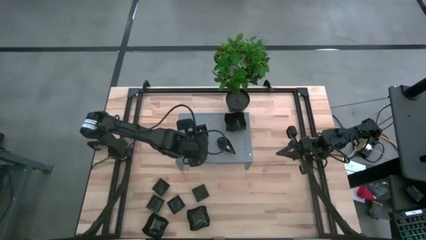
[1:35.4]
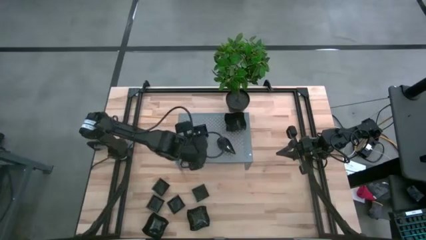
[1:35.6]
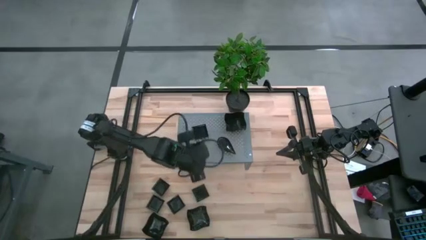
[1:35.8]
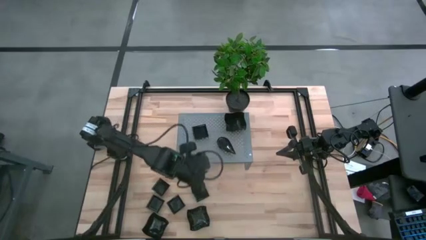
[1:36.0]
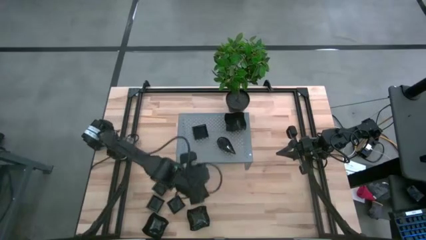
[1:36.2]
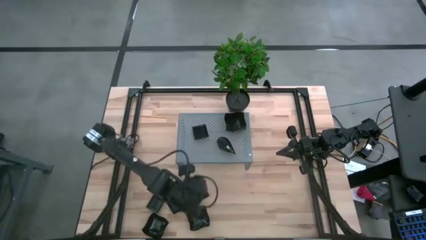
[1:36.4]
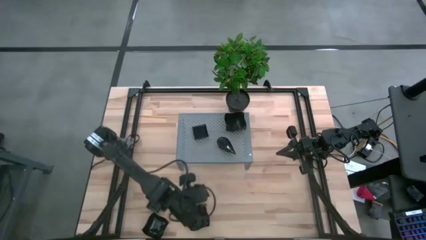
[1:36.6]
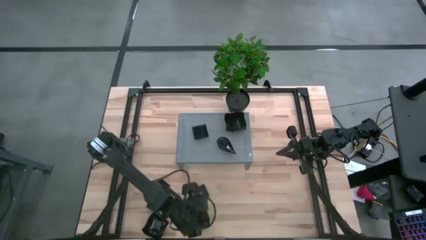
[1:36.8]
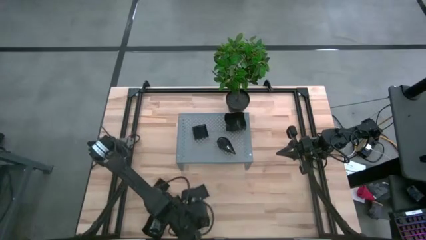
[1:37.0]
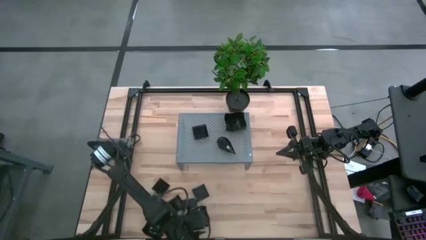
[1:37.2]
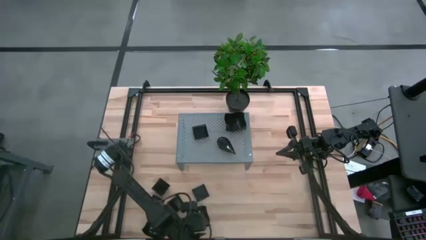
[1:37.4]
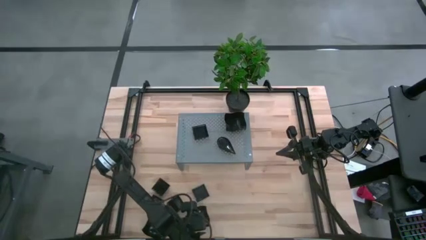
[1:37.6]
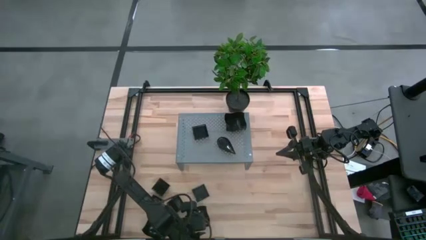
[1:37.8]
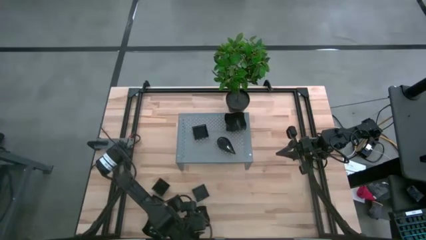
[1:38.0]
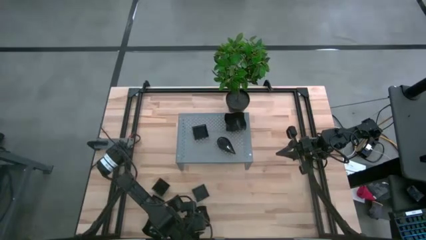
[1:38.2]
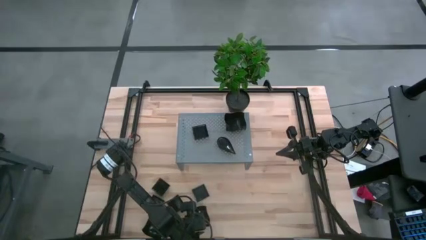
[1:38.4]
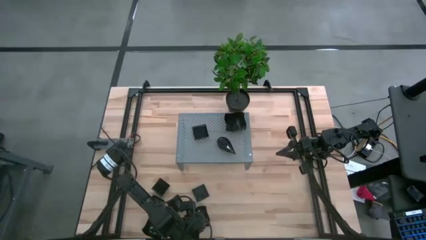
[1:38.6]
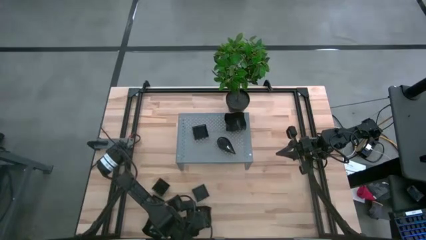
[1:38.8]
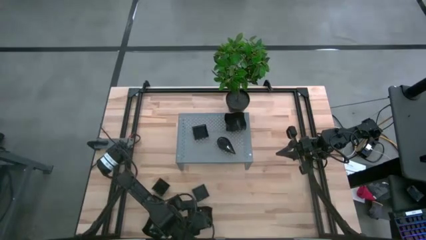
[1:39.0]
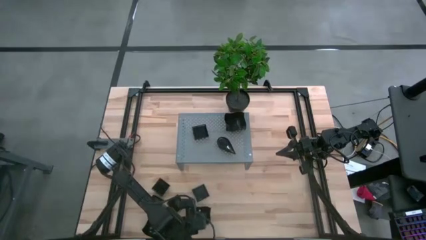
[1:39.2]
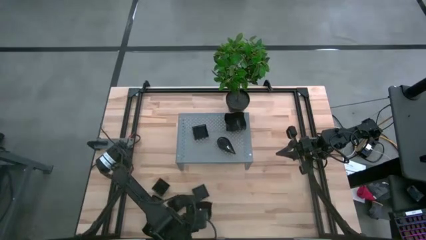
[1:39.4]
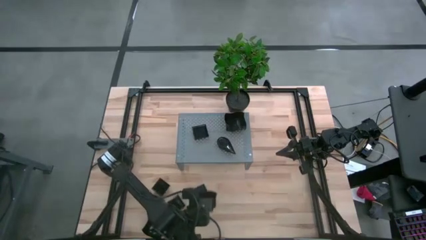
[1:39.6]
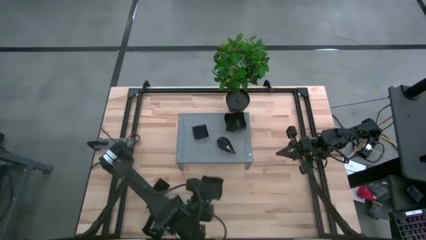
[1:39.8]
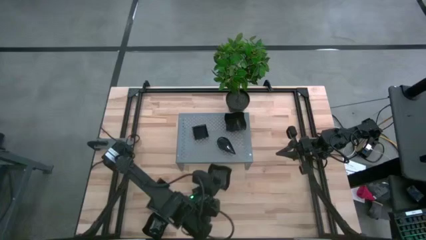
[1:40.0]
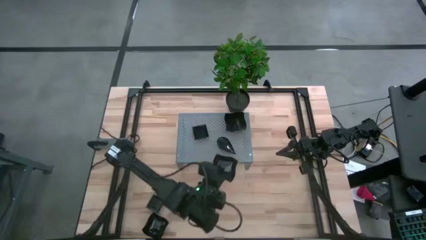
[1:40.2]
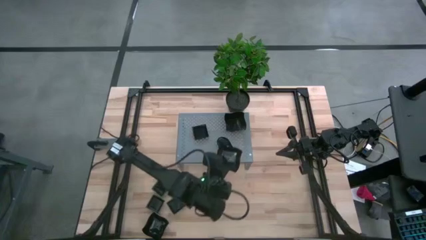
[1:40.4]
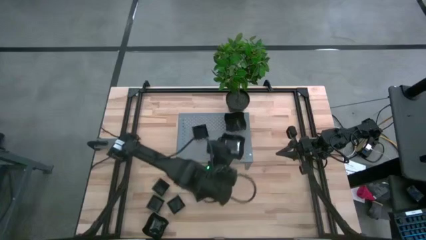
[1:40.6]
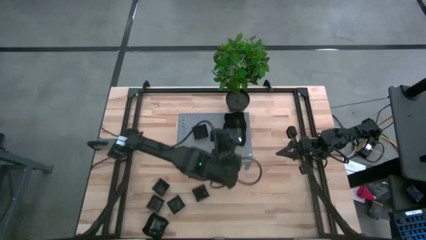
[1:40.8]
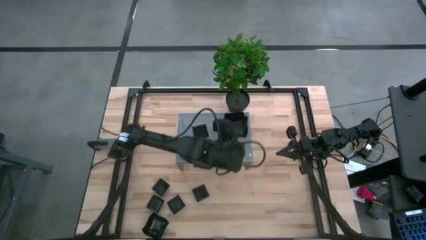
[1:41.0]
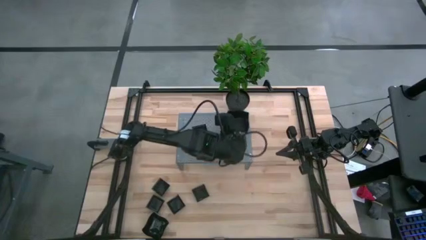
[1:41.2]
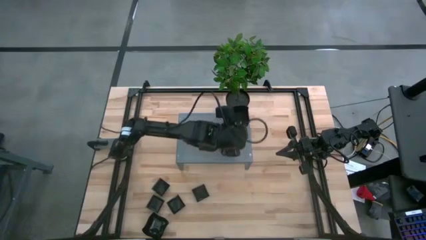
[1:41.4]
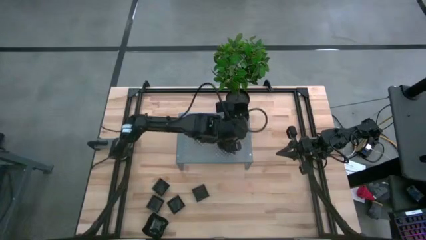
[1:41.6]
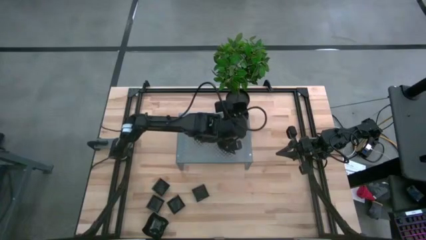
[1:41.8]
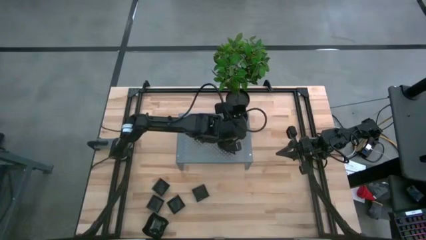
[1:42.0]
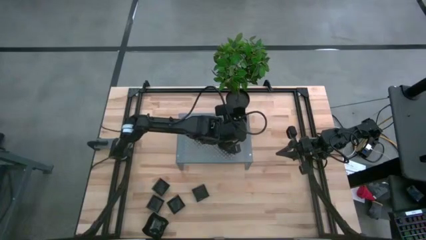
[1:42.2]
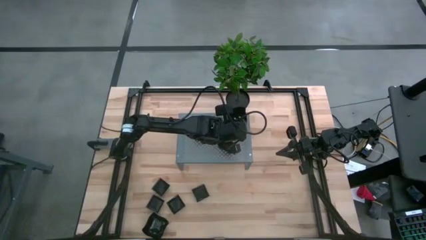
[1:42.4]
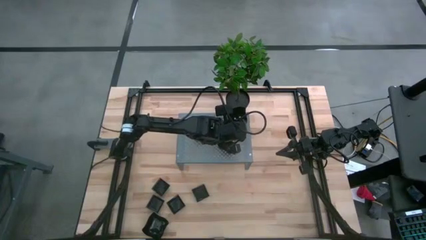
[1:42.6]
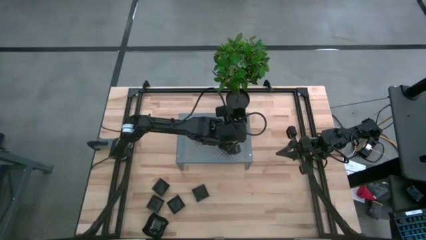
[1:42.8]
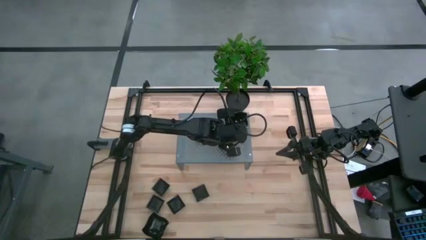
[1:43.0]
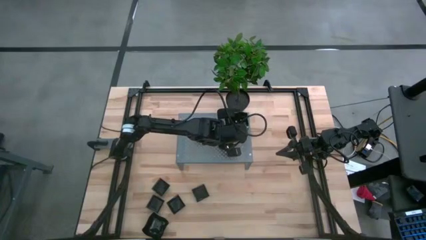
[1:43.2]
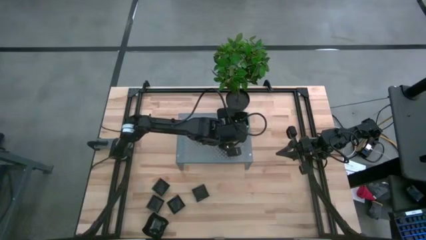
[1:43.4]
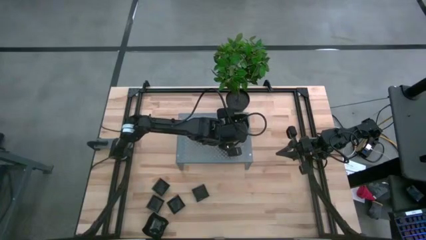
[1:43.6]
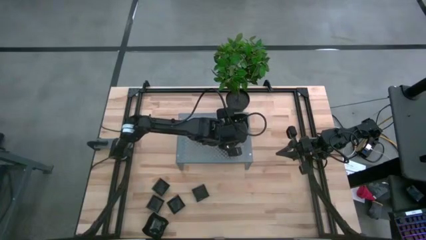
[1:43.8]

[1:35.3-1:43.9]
Task: Pick & Place Mini shaped plates
Stack the black distorted square plate on the black distorted square plates on the shelf

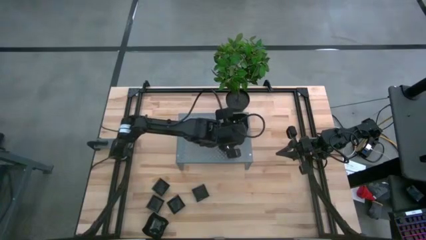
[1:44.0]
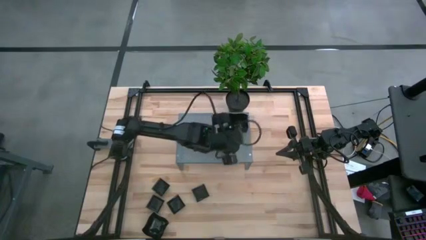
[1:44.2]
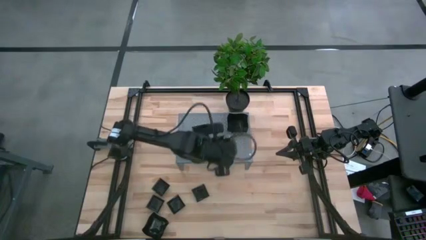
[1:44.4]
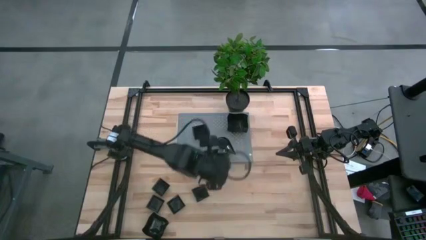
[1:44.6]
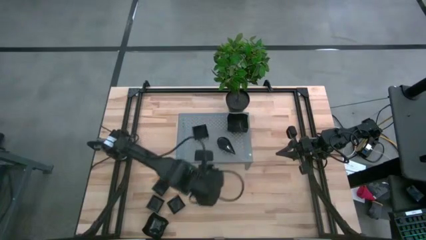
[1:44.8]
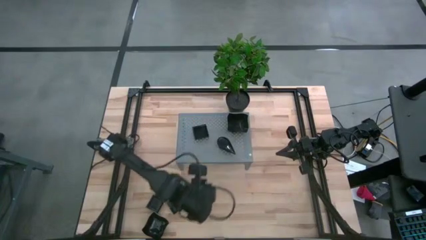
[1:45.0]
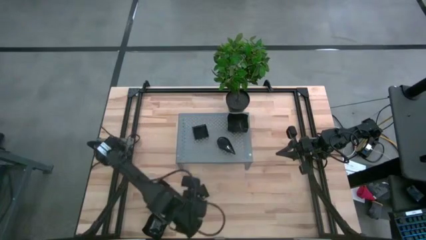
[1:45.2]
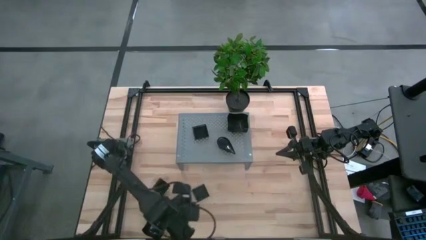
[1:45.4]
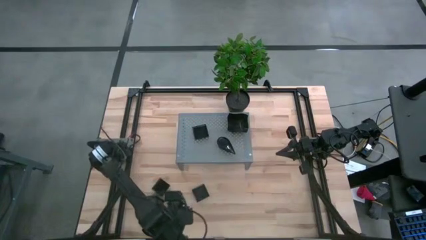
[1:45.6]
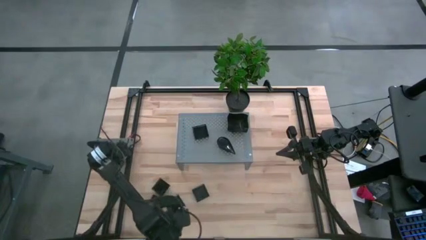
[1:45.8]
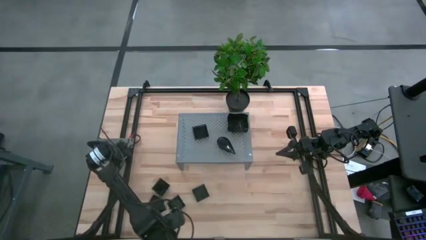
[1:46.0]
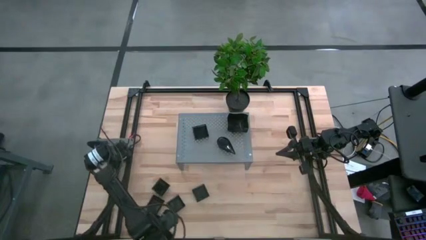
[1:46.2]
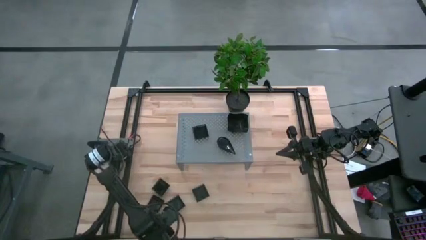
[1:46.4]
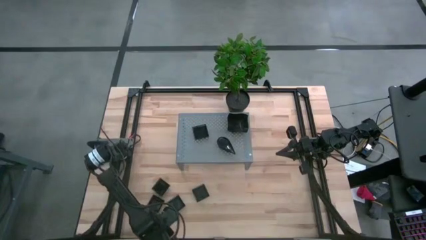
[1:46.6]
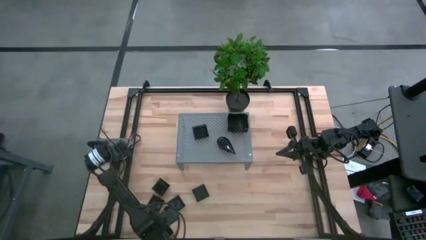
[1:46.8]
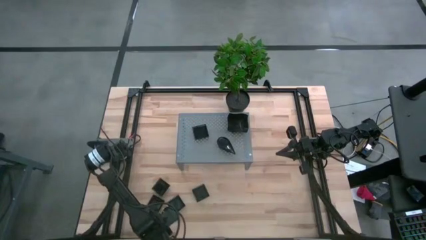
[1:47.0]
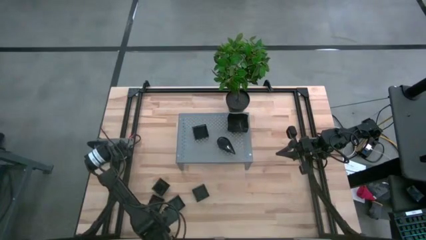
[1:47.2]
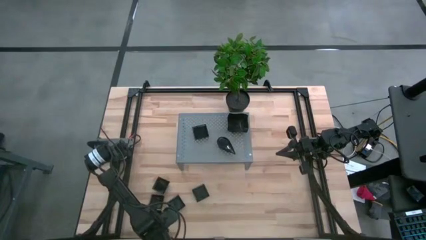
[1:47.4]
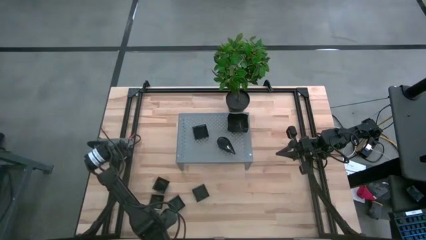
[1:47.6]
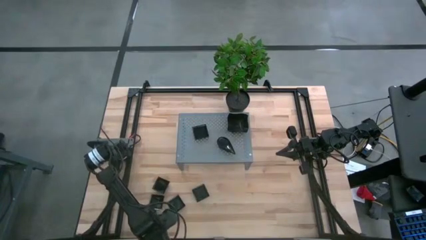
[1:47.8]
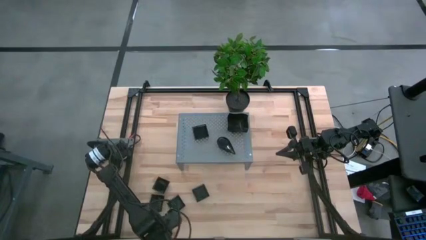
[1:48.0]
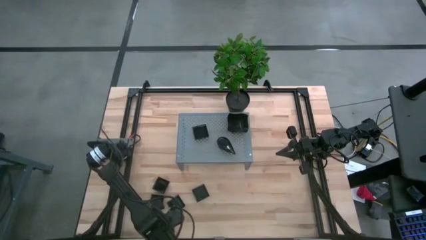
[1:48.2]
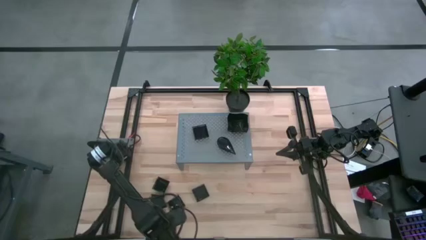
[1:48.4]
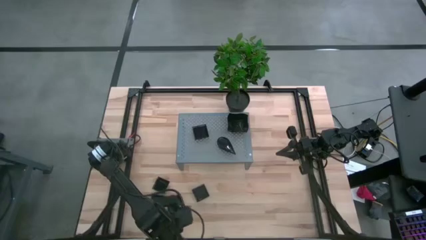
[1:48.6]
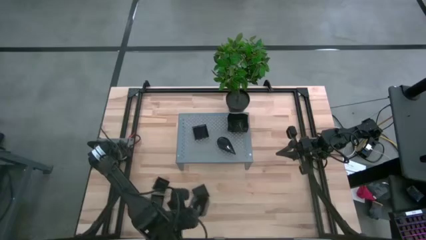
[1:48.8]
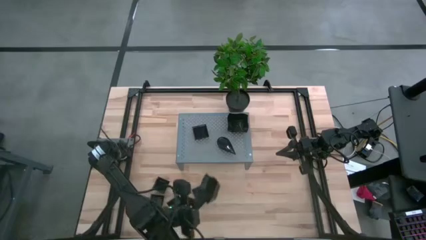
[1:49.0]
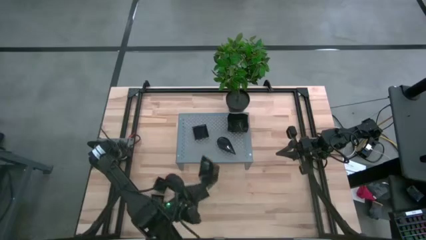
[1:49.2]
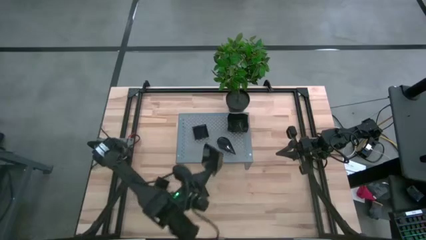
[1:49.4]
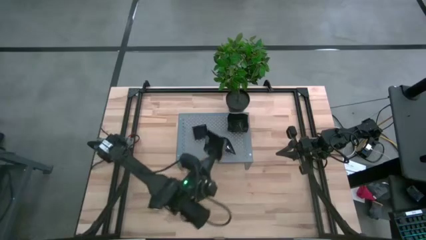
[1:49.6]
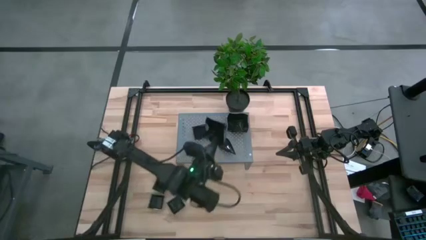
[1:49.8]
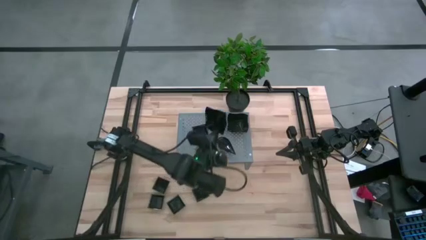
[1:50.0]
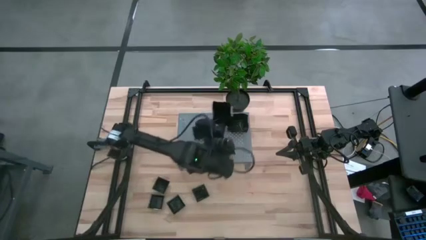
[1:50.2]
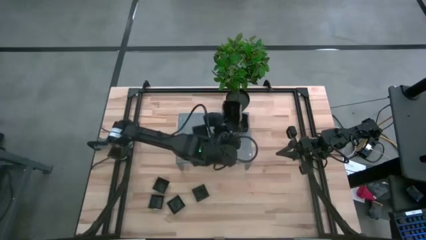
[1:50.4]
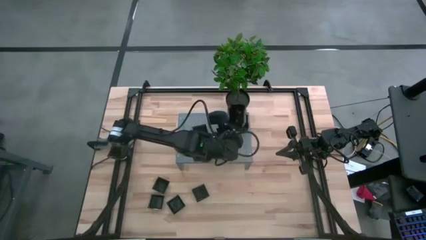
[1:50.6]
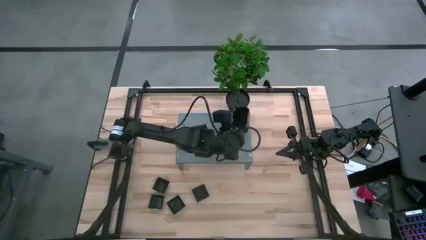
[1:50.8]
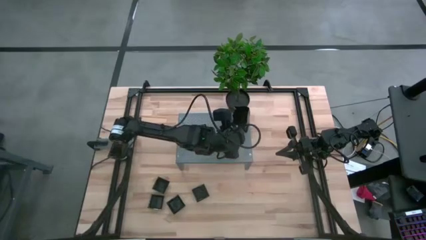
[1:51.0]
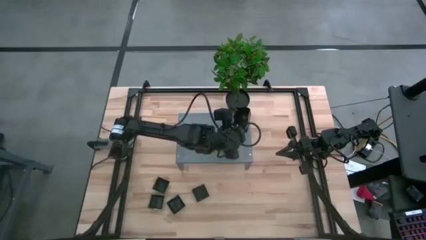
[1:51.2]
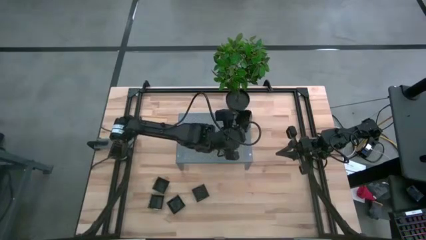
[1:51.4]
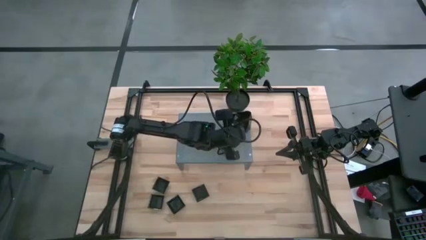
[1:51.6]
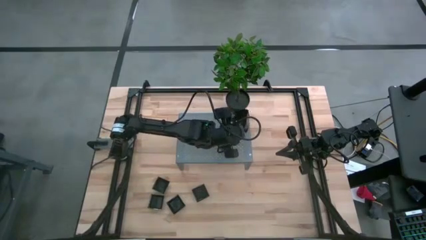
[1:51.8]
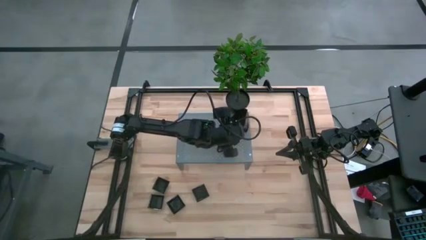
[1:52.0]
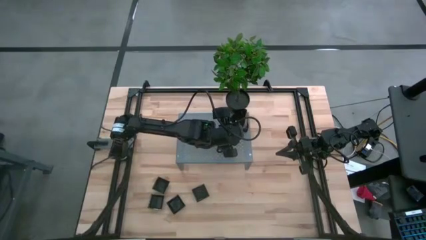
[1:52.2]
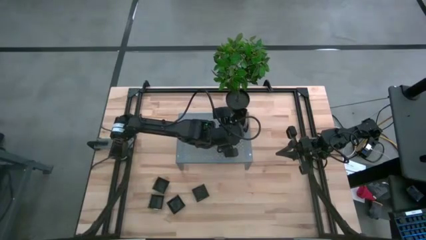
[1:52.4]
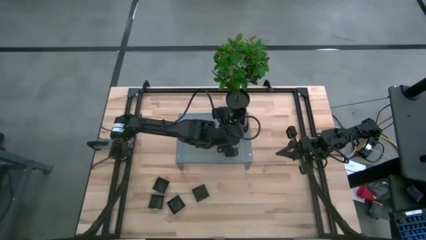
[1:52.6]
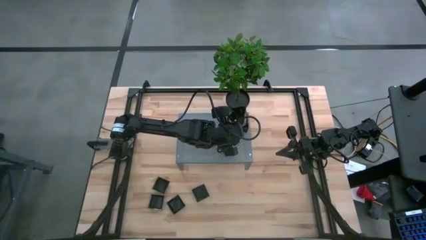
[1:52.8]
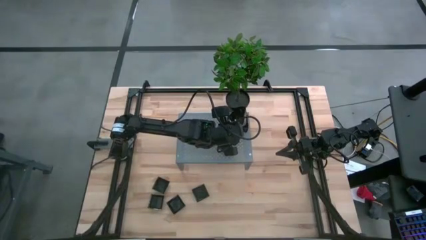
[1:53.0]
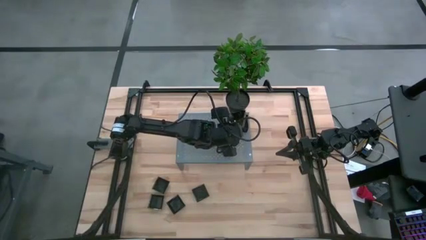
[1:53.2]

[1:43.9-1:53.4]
Stack the black distorted square plate on the black distorted square plates on the shelf
